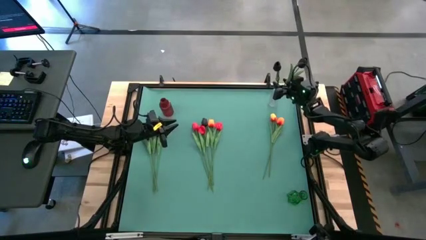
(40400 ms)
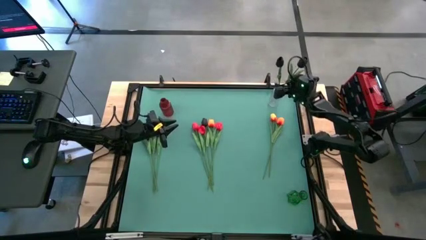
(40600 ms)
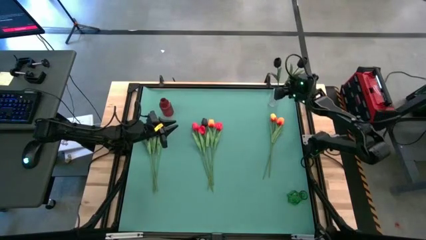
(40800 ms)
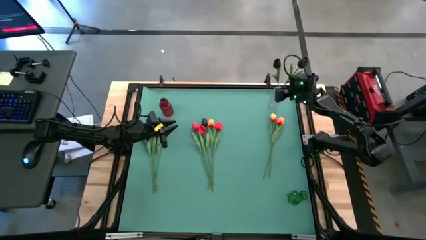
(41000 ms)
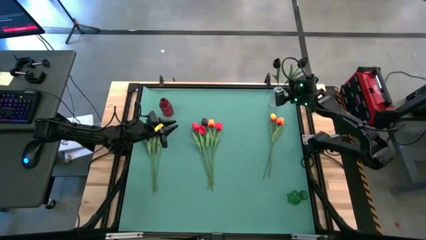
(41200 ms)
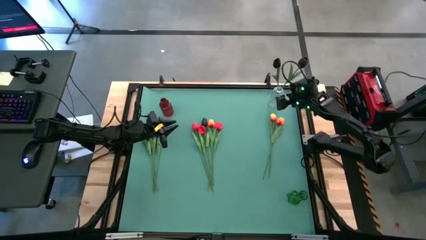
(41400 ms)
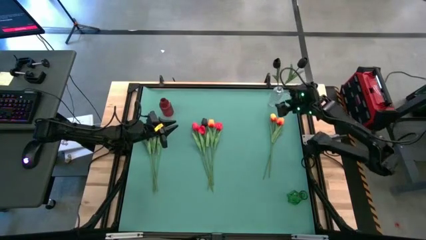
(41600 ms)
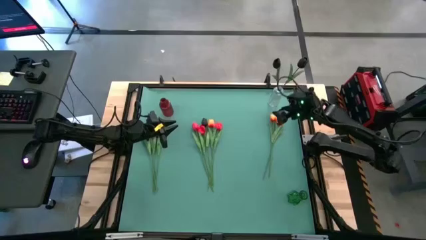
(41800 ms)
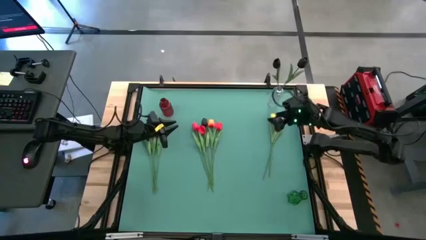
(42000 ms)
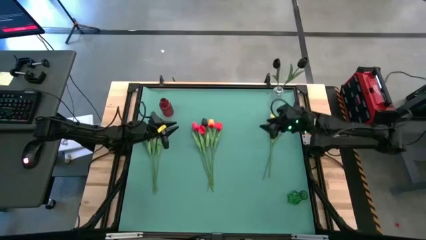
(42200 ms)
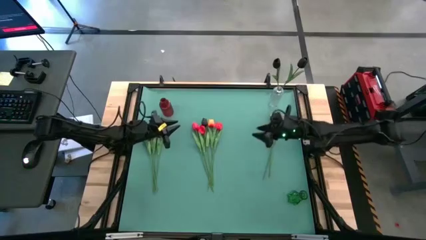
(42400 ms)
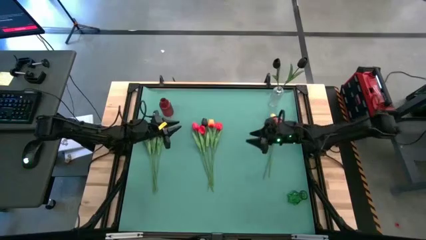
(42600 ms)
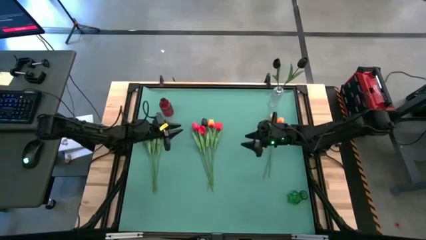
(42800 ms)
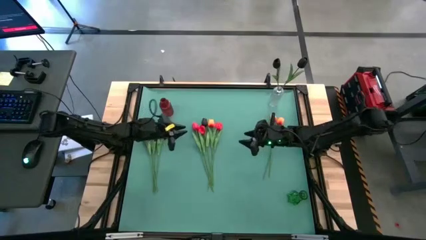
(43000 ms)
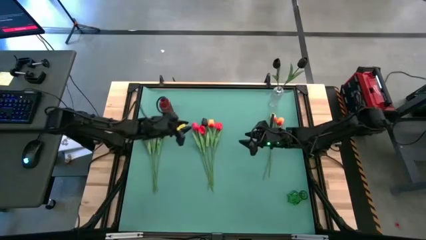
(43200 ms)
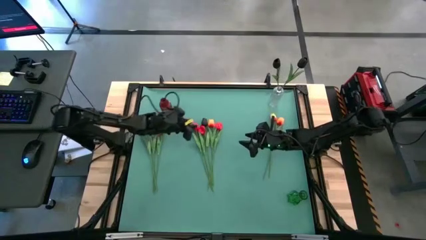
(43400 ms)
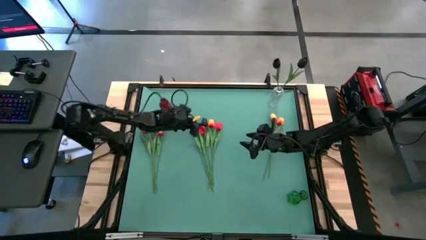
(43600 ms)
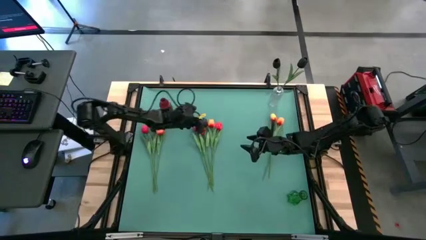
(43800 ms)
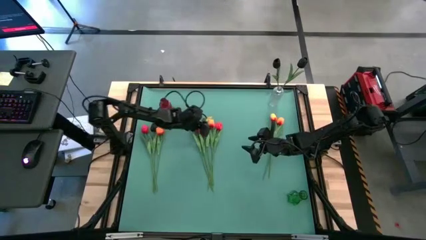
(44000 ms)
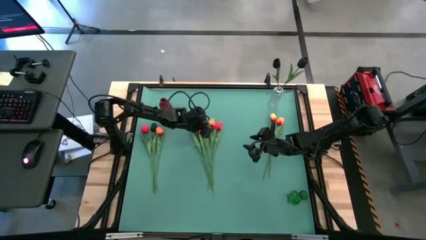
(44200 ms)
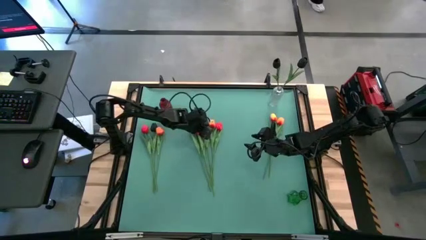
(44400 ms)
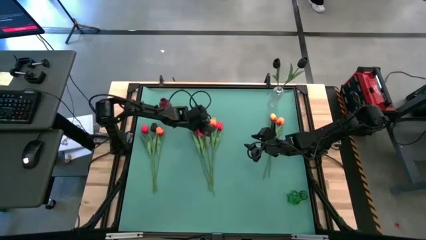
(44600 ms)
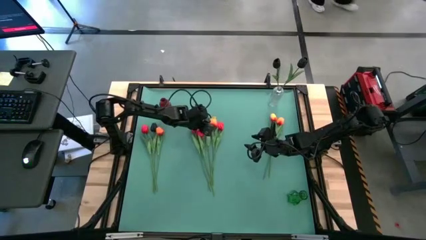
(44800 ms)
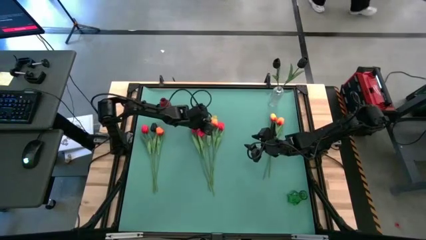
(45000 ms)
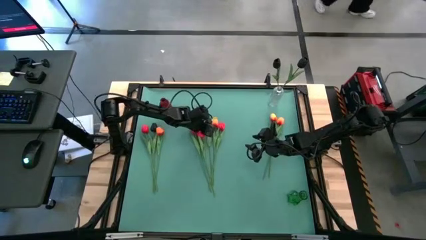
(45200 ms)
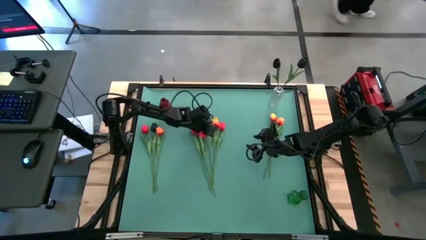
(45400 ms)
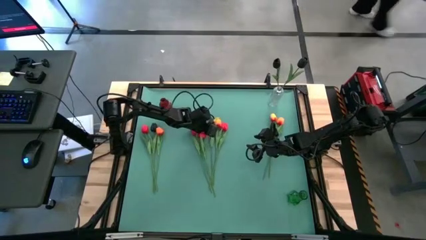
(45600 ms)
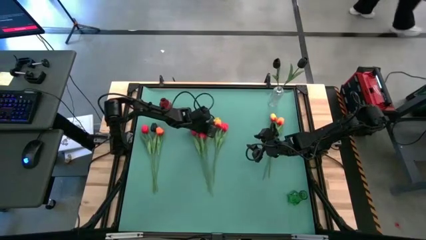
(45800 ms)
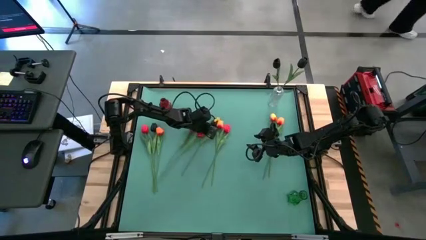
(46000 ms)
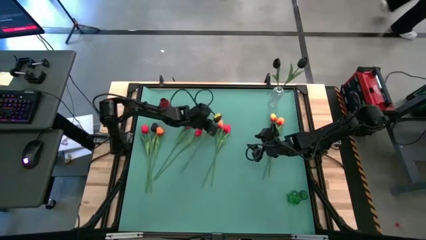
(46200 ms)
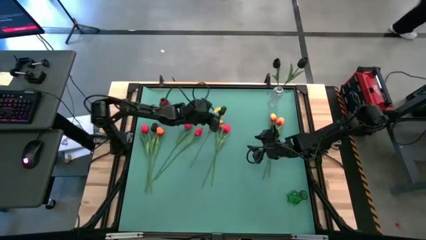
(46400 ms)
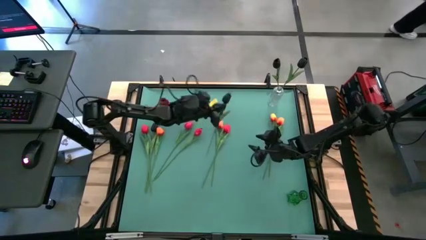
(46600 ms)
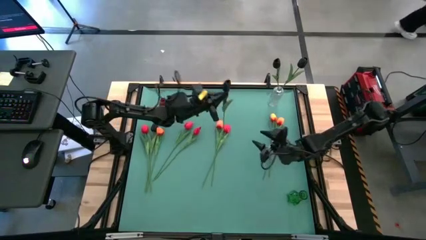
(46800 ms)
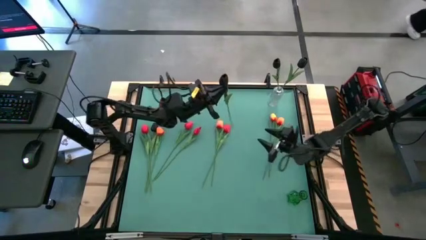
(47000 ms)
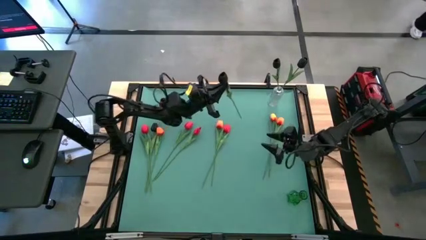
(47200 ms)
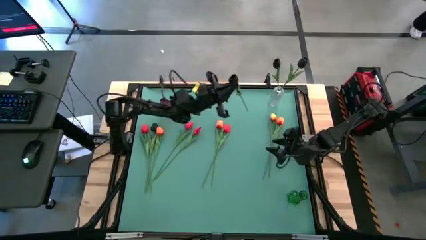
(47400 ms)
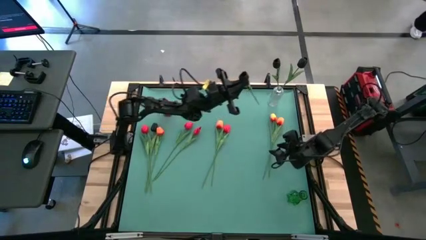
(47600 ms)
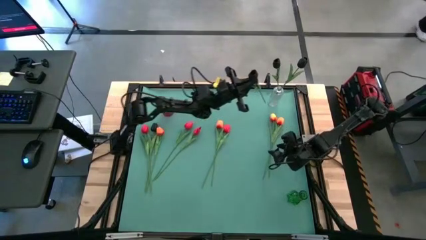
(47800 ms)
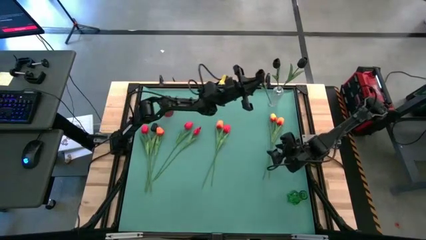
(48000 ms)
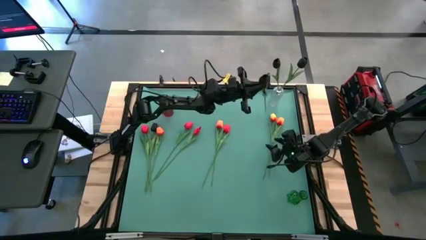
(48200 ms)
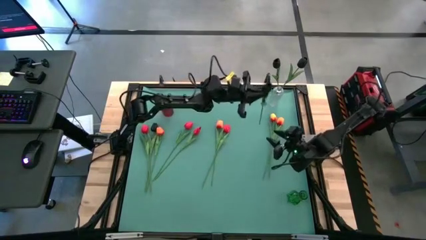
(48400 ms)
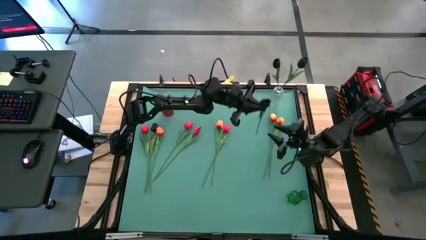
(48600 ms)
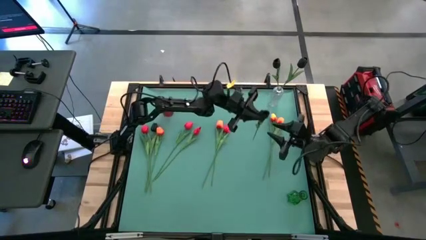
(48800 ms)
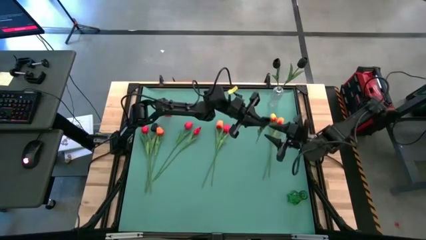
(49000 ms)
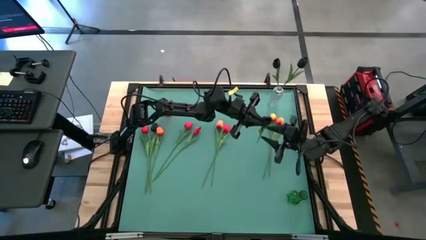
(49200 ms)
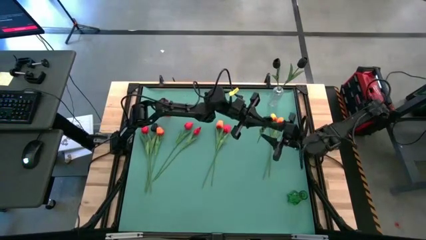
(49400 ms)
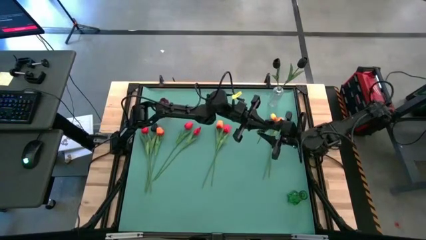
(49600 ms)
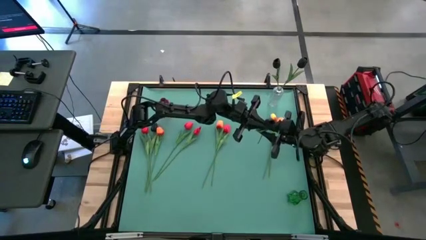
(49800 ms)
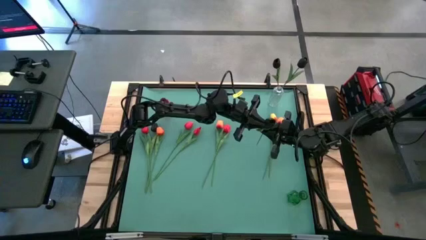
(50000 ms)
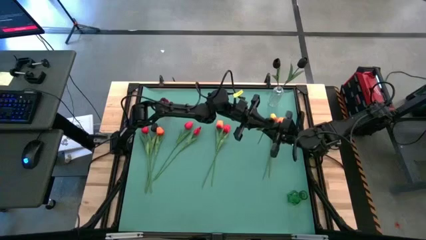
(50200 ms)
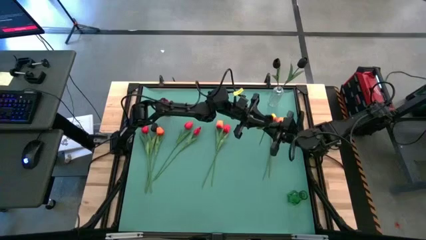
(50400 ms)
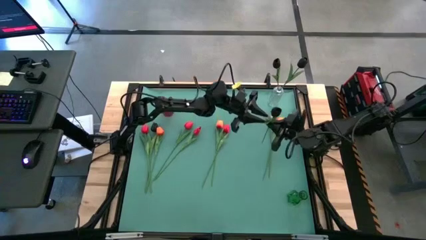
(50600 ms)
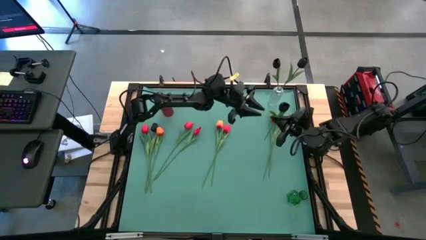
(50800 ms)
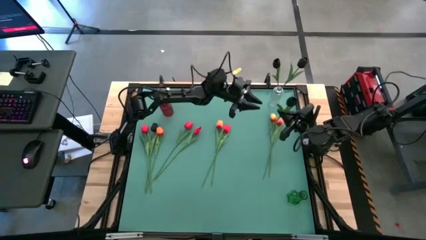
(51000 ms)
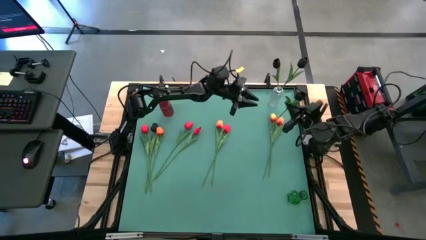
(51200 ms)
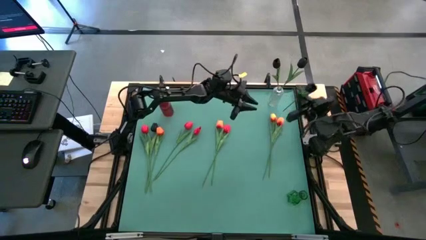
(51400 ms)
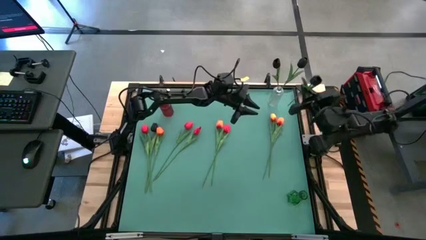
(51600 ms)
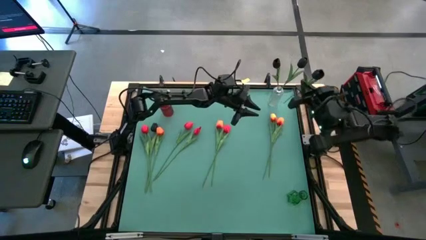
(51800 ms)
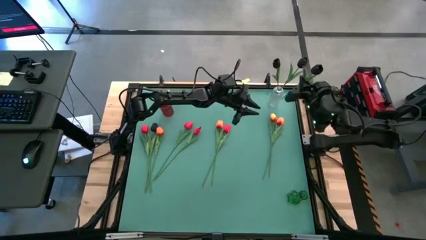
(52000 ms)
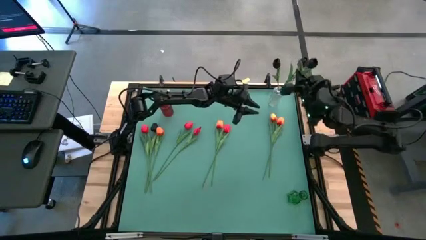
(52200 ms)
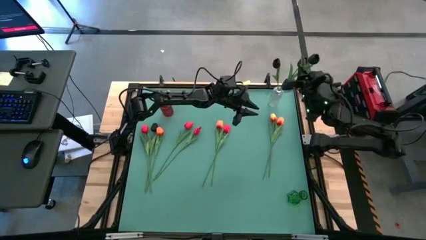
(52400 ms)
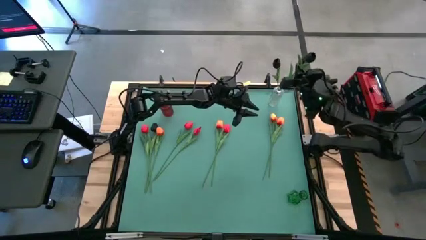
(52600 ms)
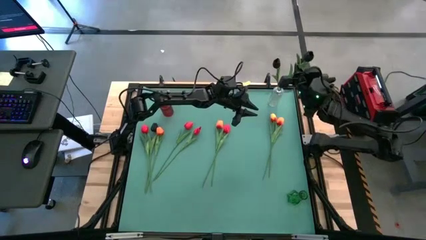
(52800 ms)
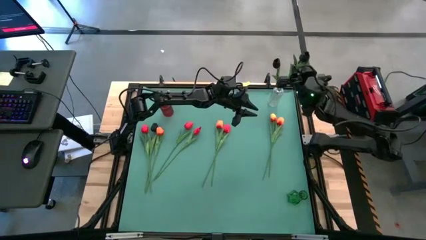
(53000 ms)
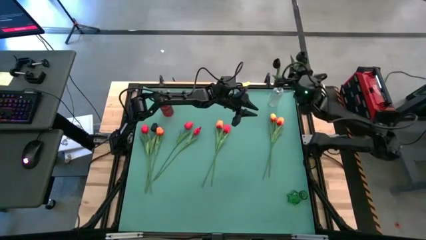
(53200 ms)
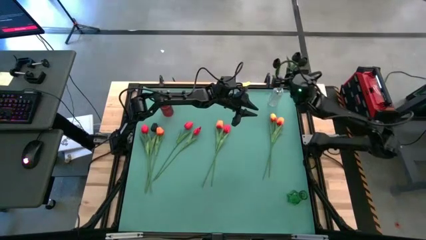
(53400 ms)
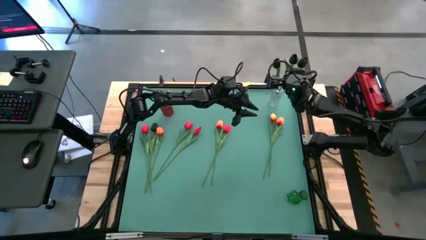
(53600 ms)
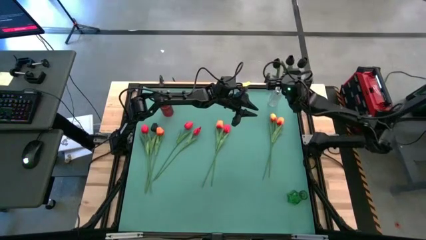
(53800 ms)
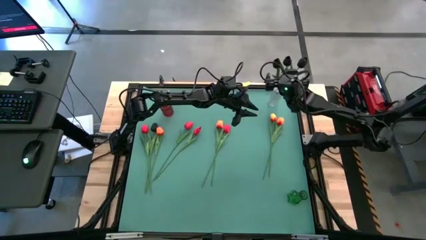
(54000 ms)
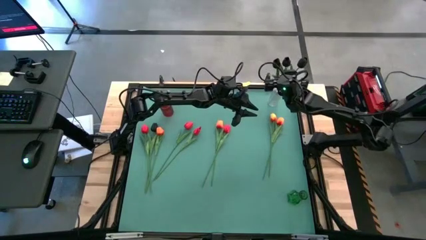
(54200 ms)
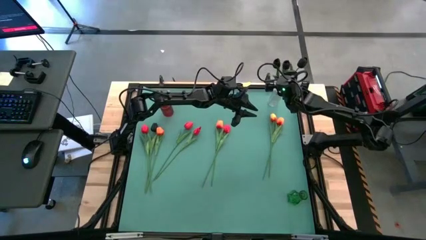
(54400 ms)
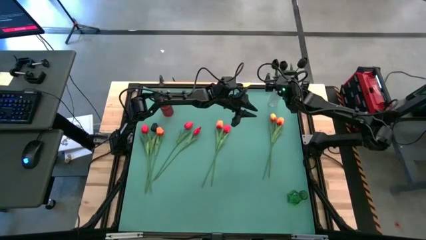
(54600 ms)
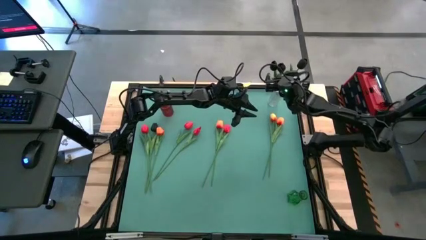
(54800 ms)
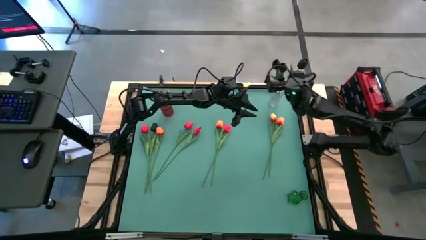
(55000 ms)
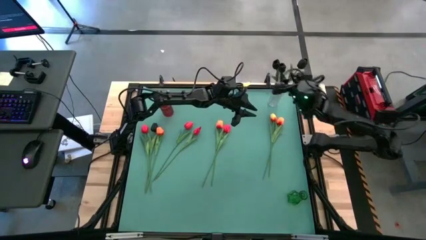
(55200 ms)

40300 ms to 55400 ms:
Task: Sort flowers into vase by color
Put the black tulip into the transparent vase
